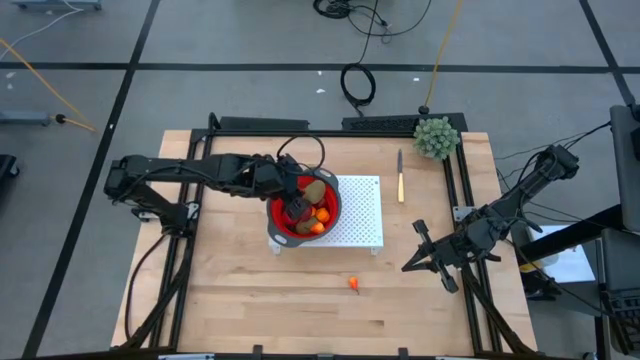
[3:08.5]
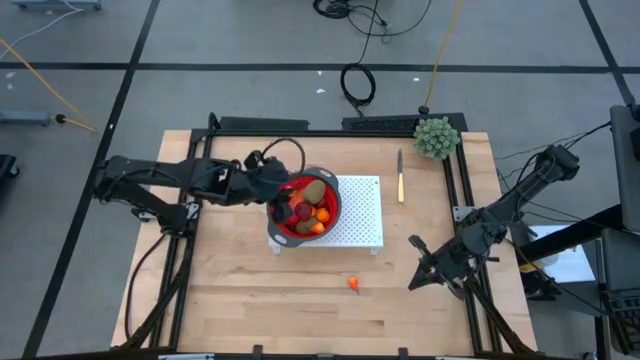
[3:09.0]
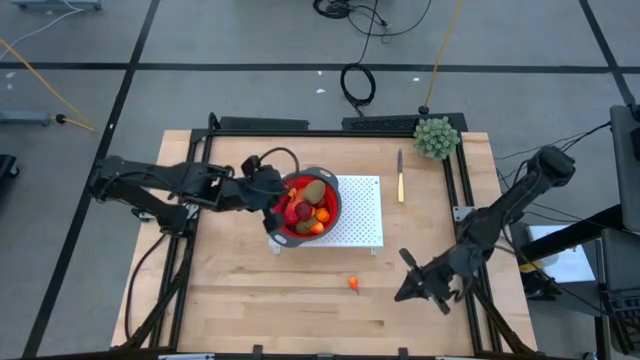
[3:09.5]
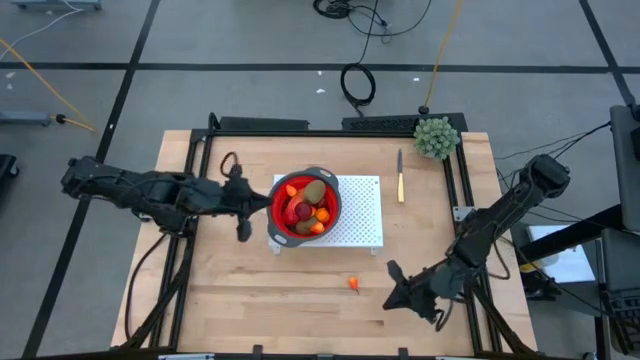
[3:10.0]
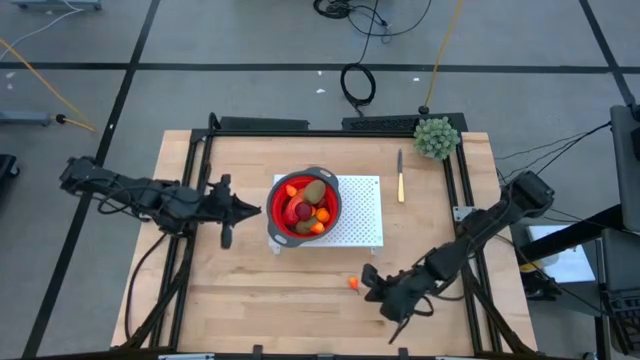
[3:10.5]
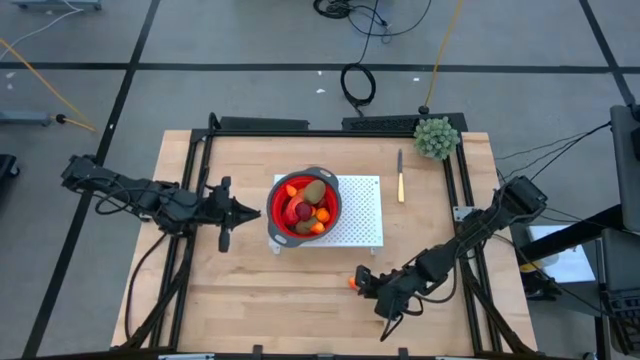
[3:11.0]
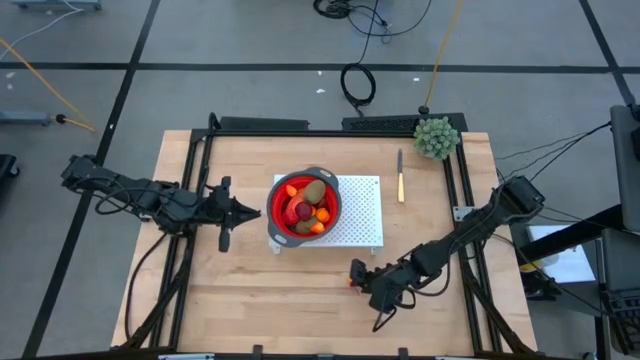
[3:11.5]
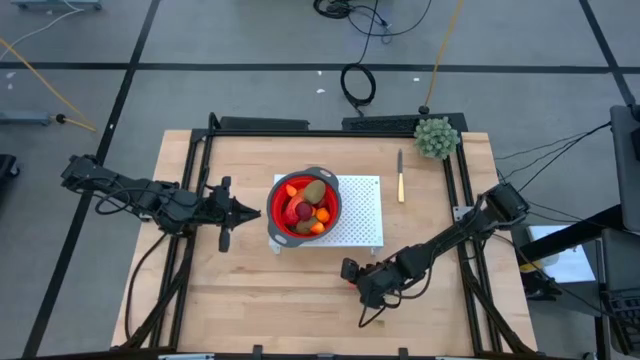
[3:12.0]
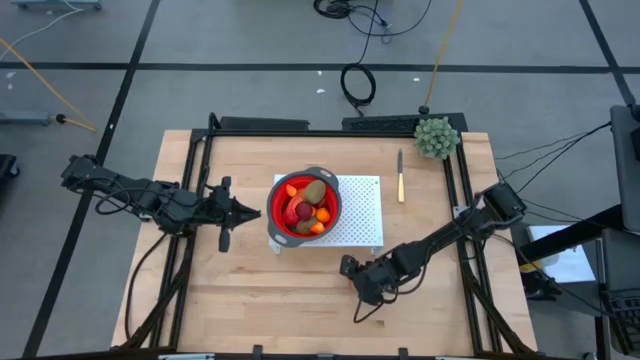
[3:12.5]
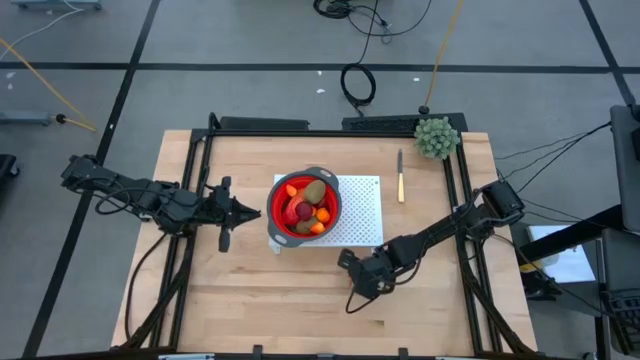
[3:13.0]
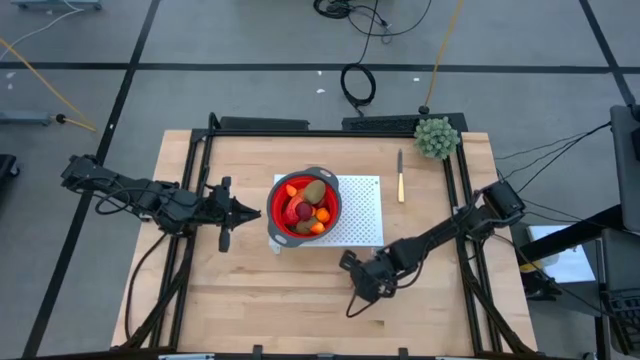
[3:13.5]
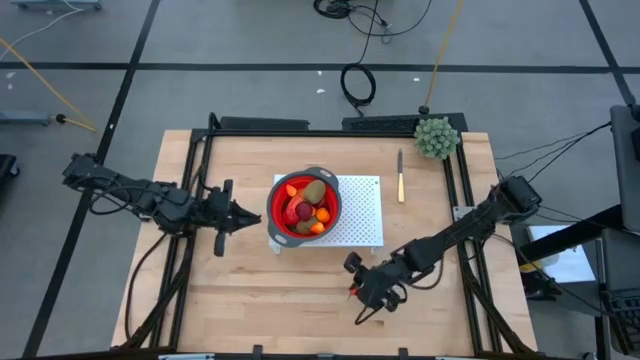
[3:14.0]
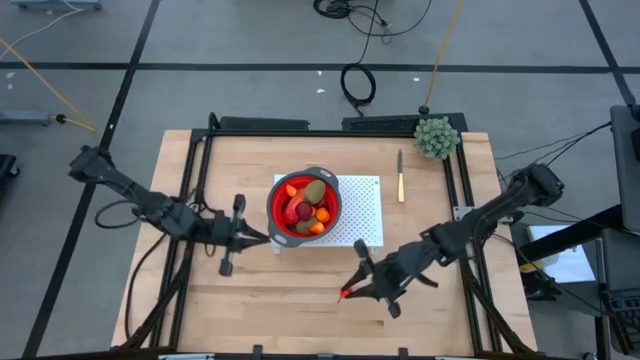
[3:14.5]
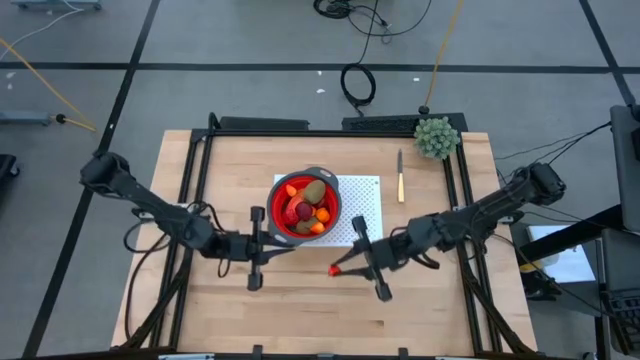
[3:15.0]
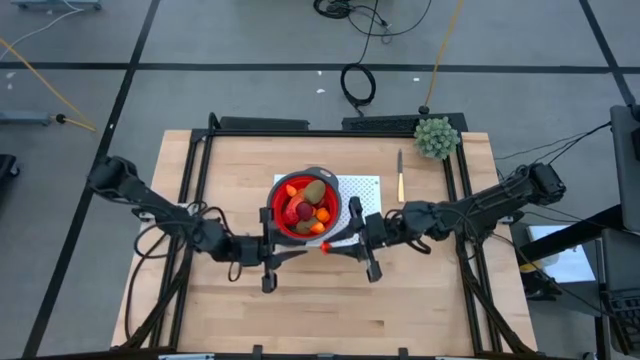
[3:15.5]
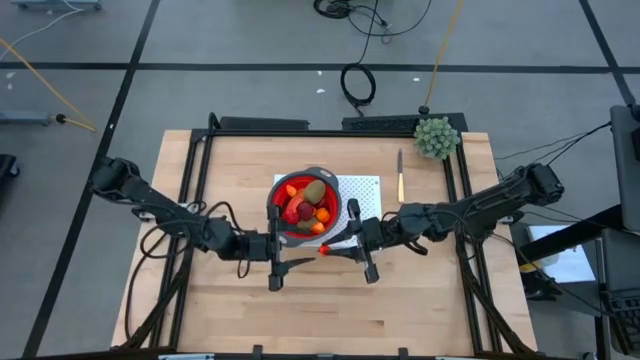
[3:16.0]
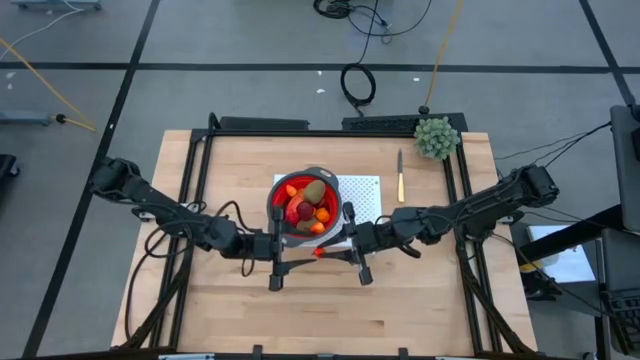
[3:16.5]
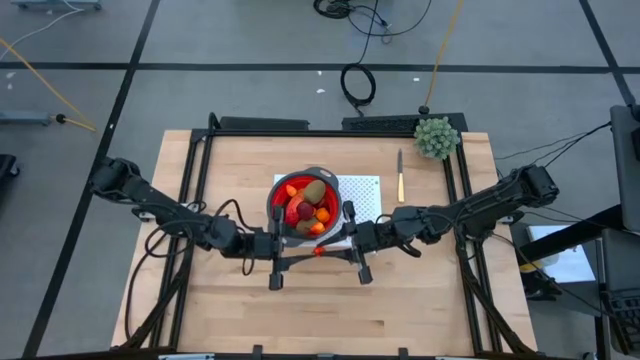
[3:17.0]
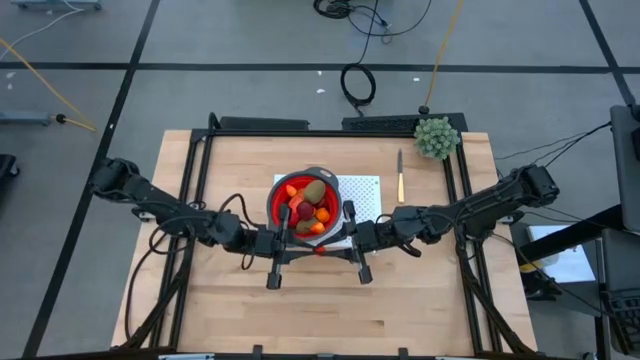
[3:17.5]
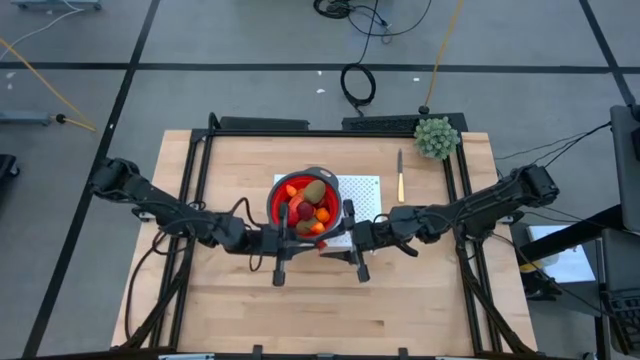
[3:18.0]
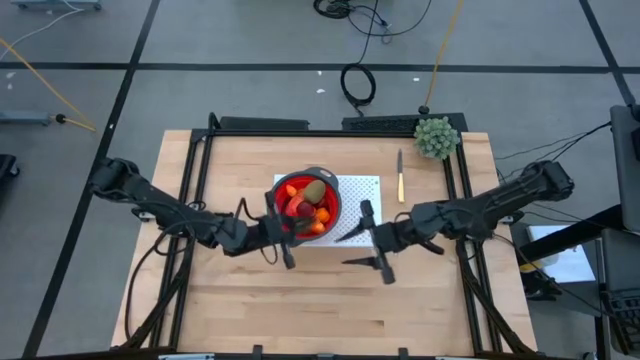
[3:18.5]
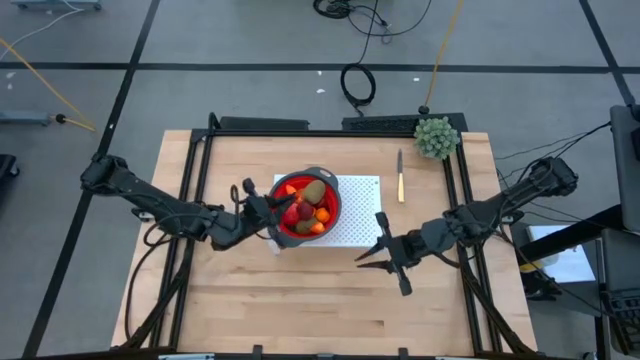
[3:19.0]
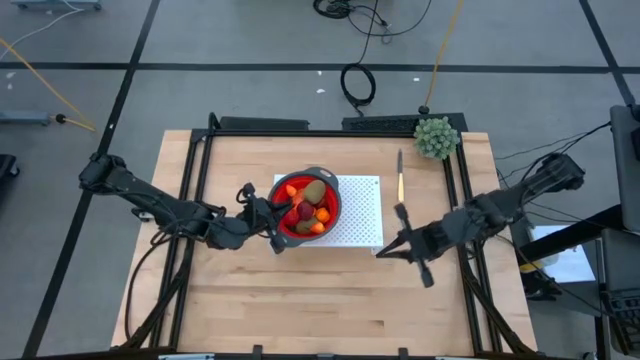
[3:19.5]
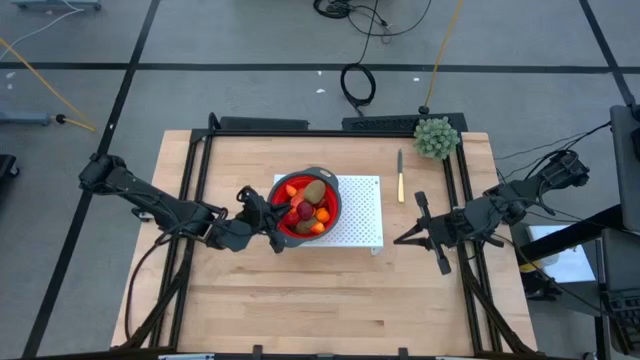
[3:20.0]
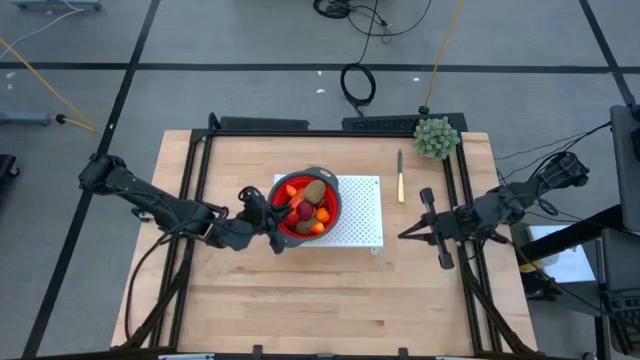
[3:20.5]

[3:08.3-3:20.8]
Task: Pick & Place Fruit
Put the peach into the strainer bowl on the shelf

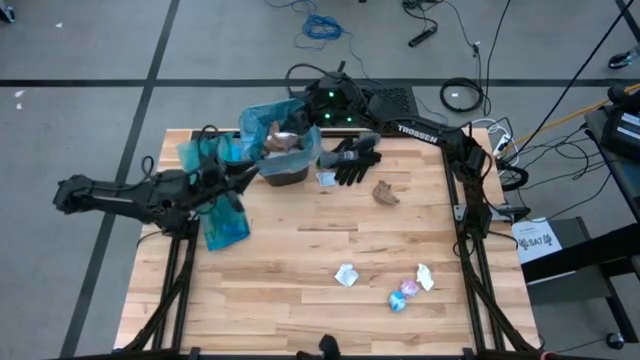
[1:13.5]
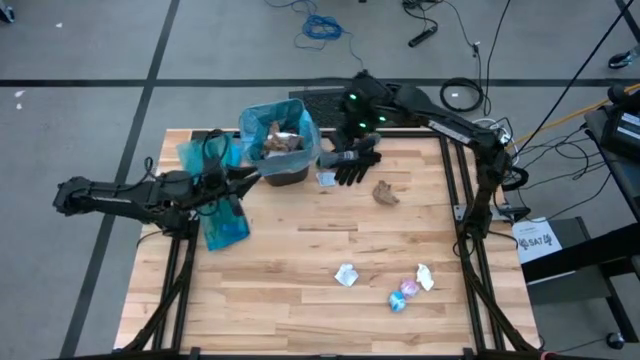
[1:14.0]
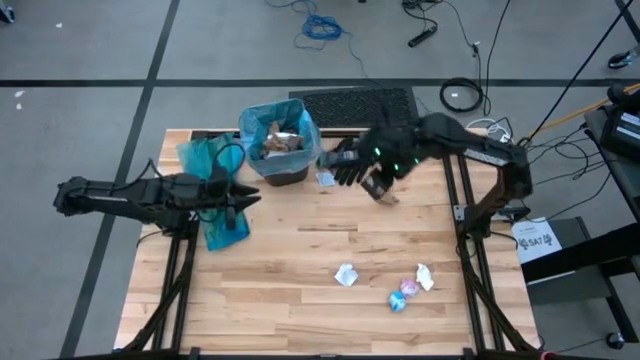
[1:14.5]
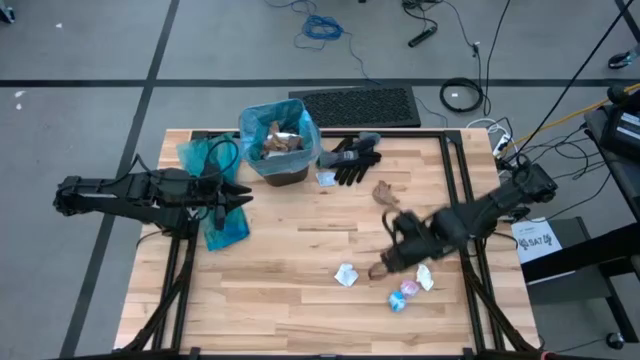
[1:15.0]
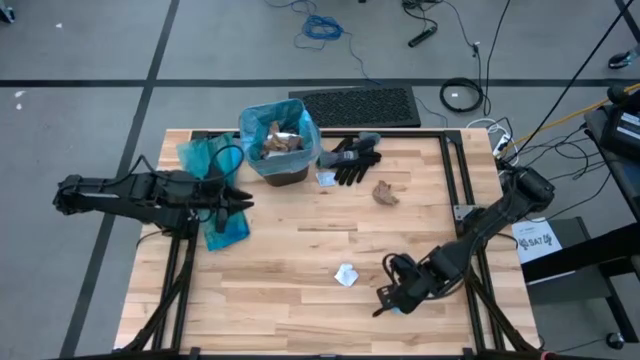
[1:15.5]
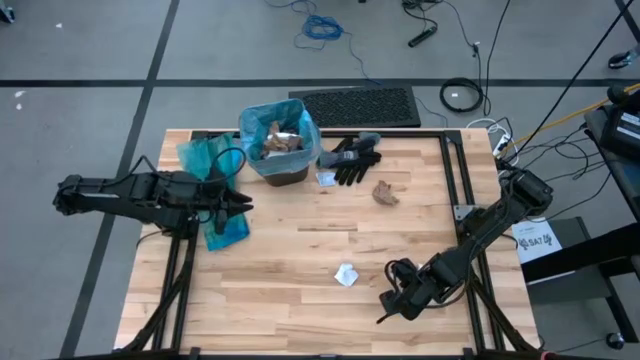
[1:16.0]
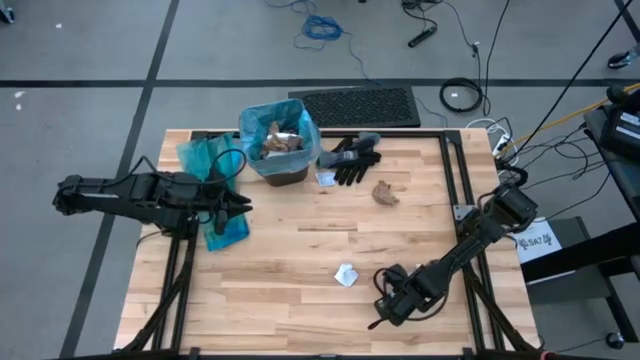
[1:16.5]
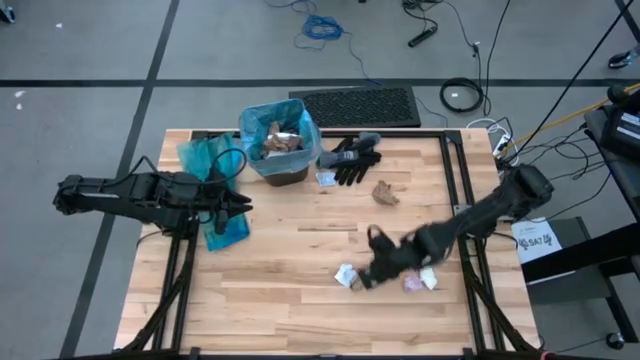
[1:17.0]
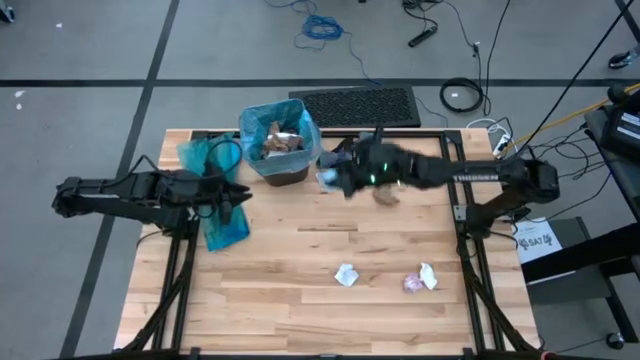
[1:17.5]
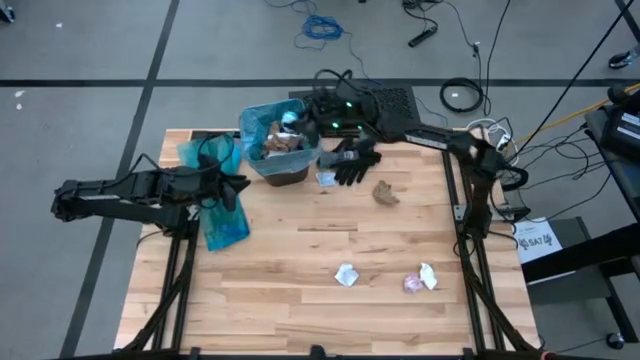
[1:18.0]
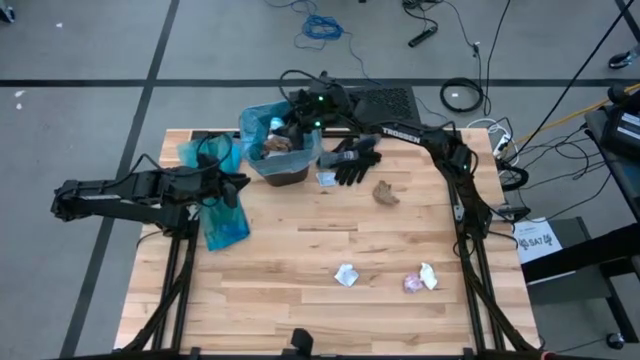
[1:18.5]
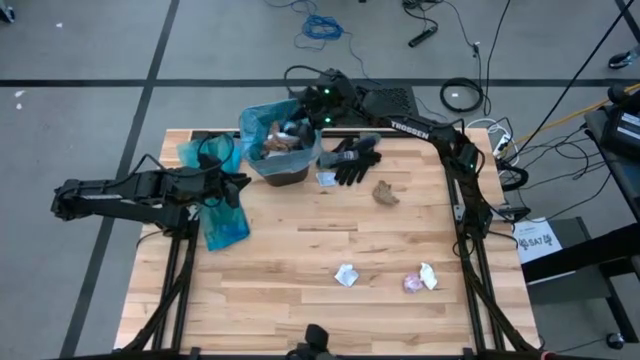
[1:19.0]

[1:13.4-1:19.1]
Task: place trash/remove bag and relplace
Put the blue plastic into the trash bin

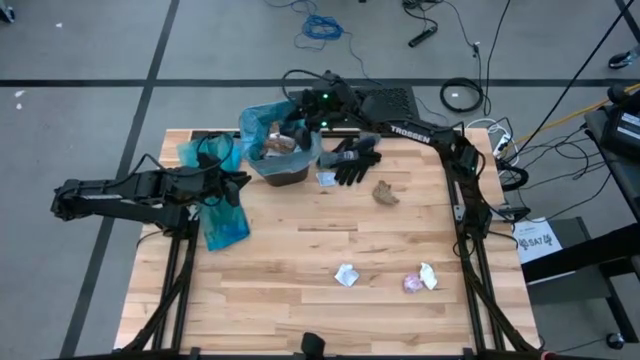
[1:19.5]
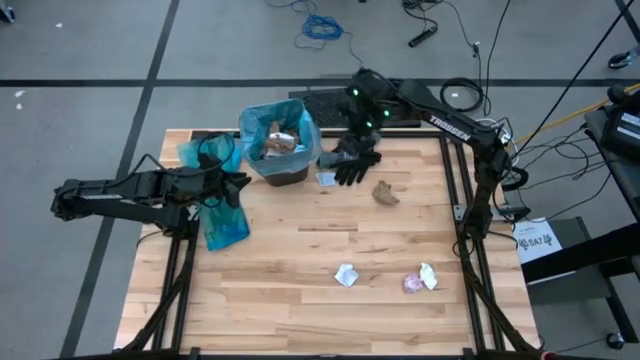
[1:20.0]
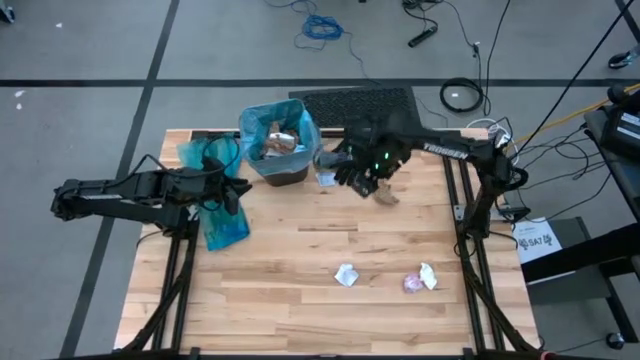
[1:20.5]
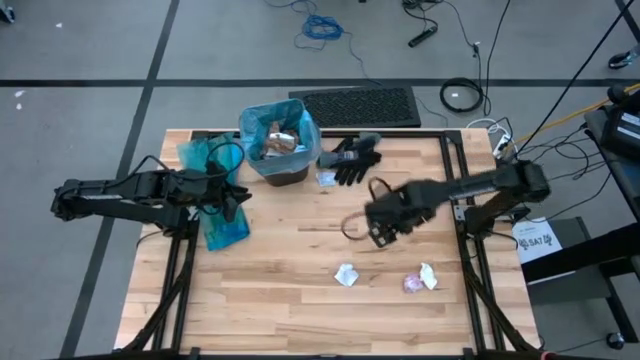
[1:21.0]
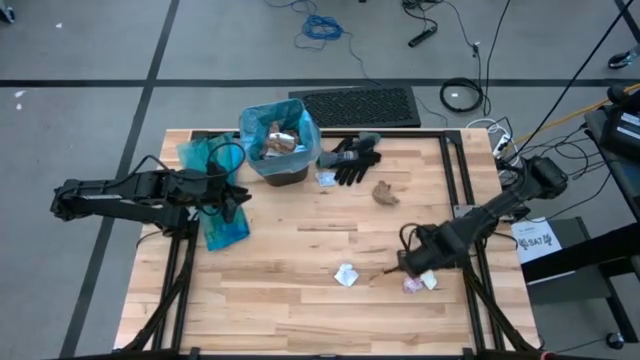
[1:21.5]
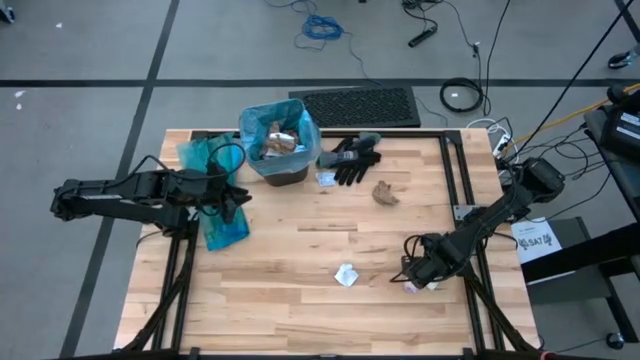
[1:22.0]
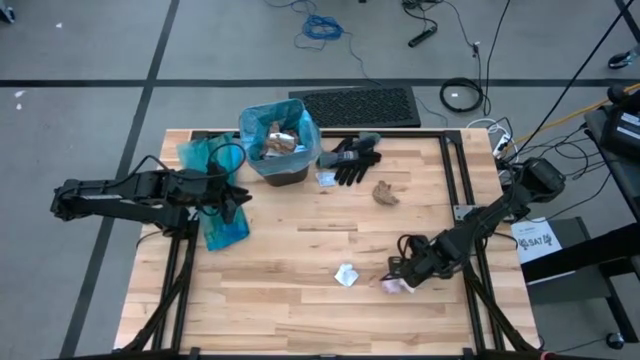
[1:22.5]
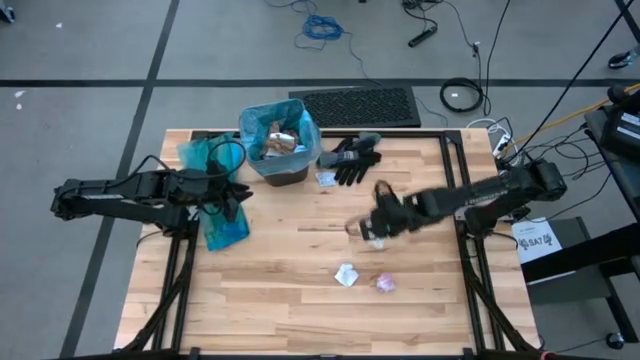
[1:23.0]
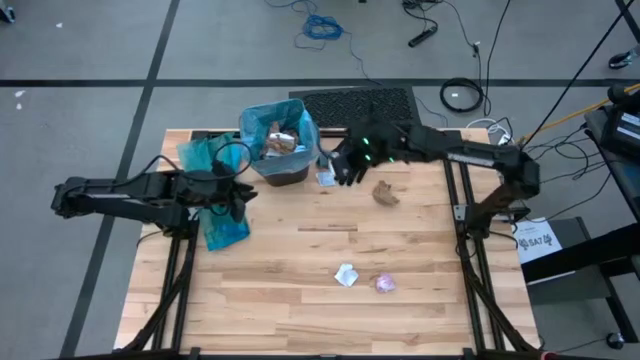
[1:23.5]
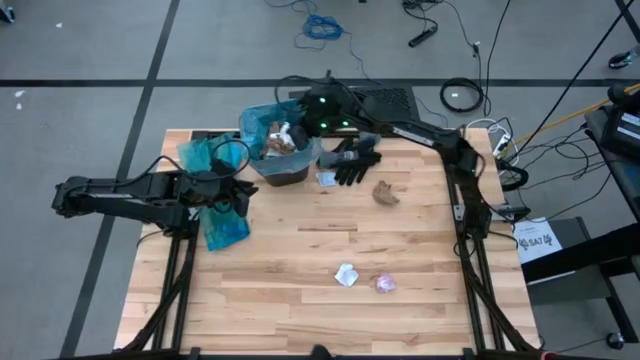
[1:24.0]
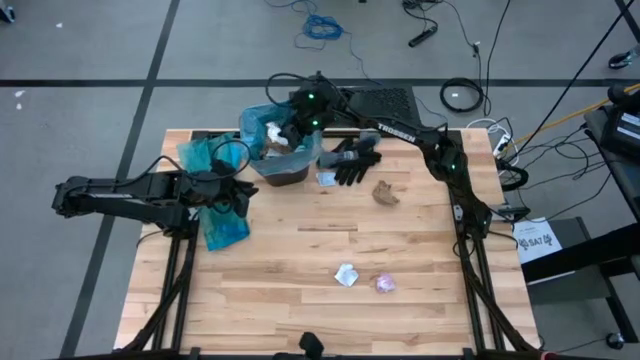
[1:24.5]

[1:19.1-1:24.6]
Put the white napkin into the trash bin
